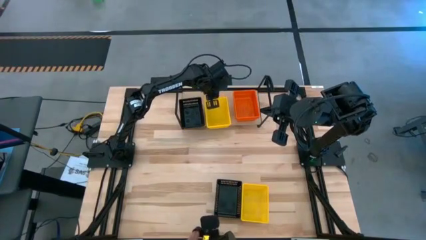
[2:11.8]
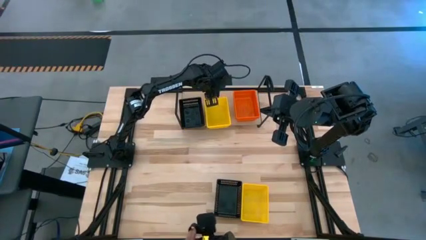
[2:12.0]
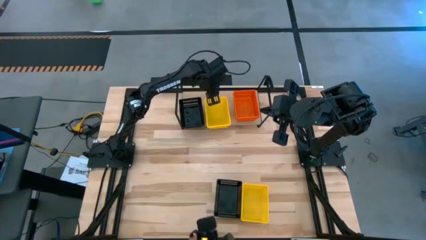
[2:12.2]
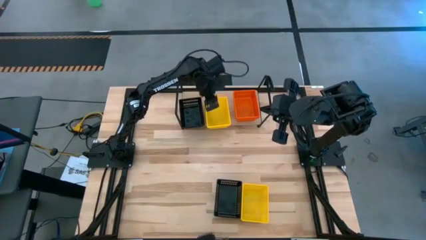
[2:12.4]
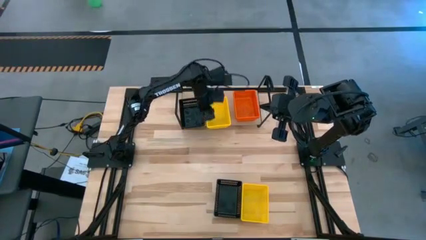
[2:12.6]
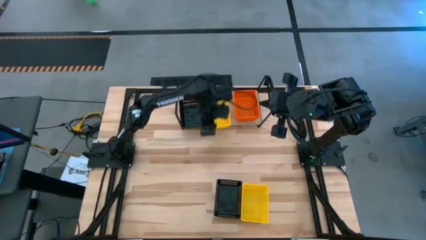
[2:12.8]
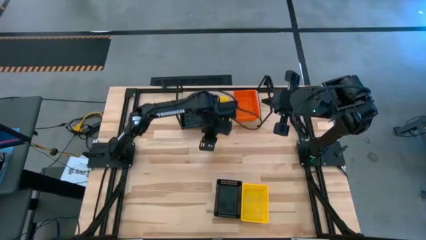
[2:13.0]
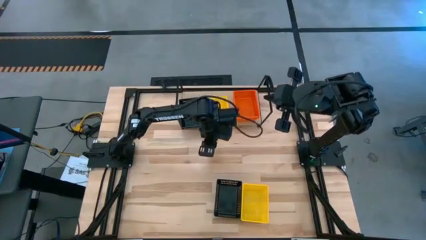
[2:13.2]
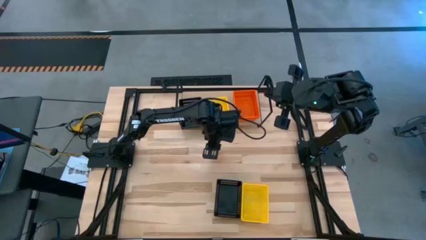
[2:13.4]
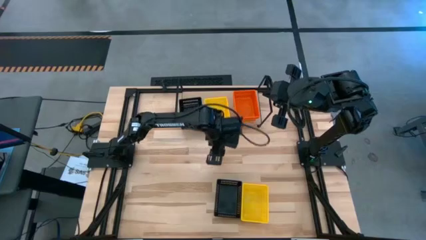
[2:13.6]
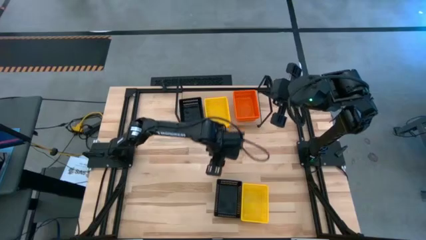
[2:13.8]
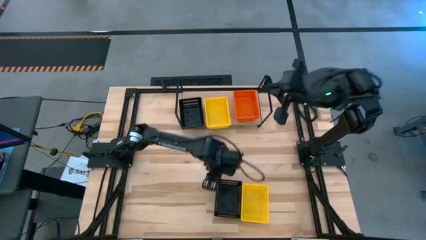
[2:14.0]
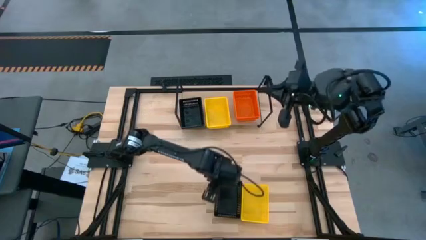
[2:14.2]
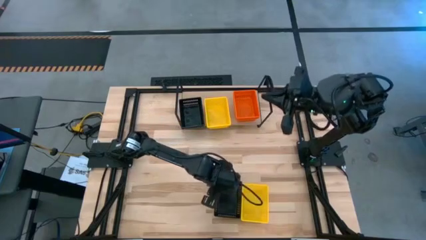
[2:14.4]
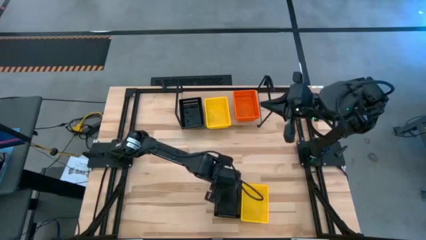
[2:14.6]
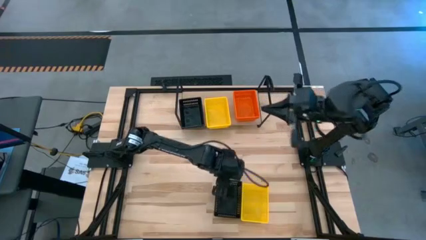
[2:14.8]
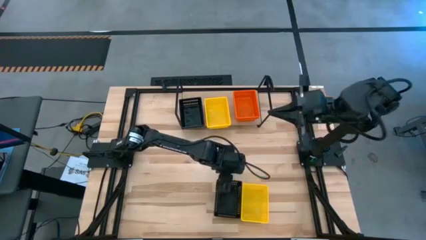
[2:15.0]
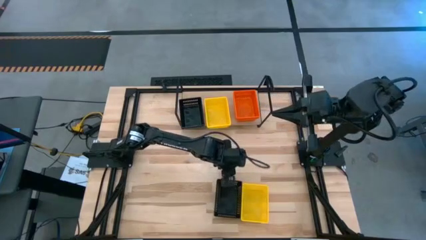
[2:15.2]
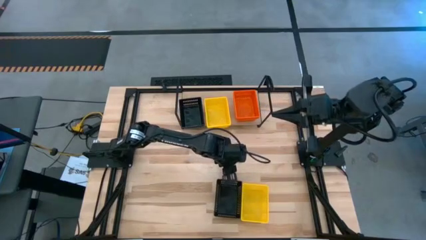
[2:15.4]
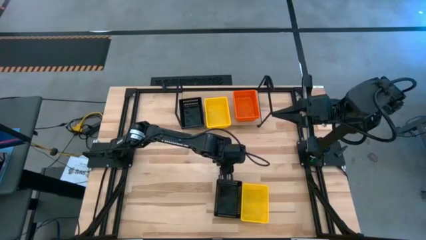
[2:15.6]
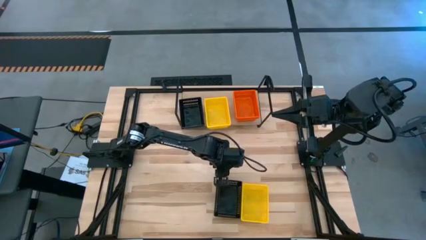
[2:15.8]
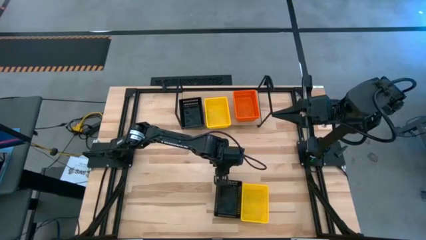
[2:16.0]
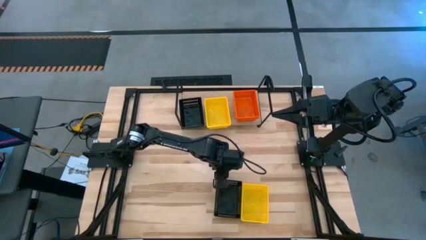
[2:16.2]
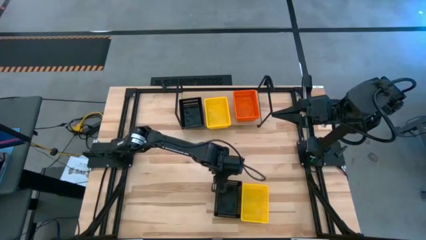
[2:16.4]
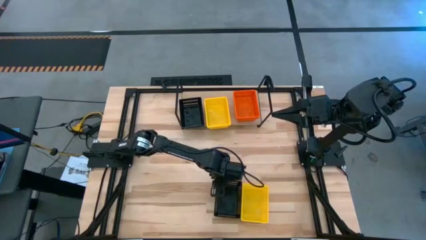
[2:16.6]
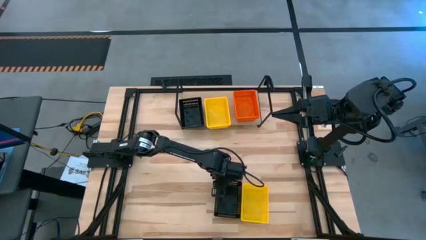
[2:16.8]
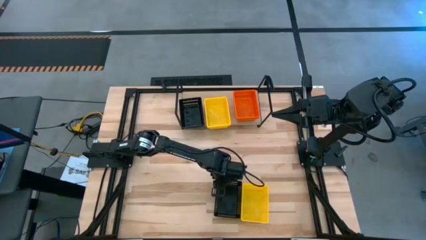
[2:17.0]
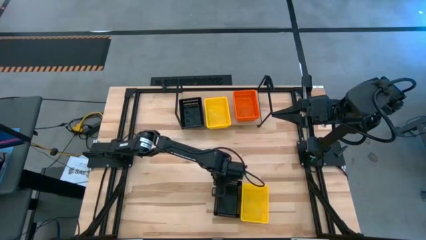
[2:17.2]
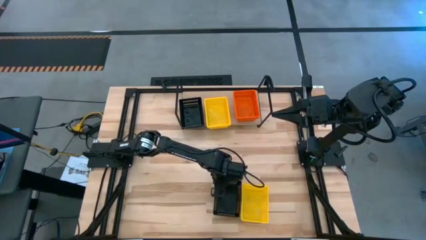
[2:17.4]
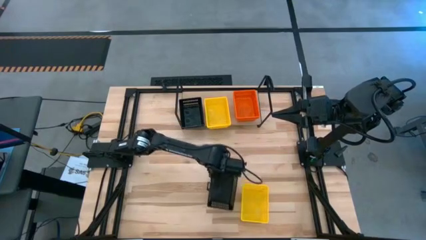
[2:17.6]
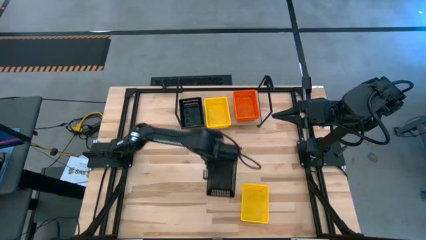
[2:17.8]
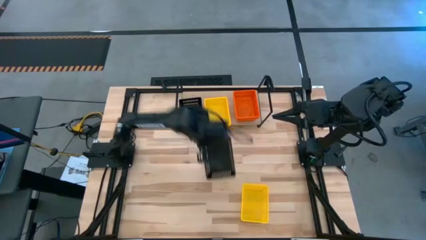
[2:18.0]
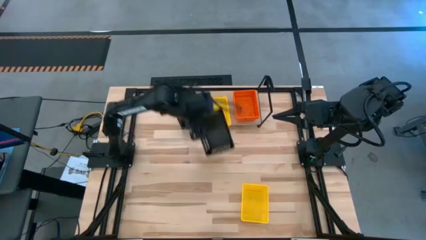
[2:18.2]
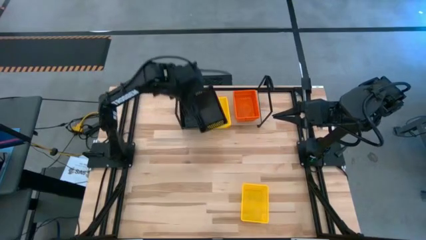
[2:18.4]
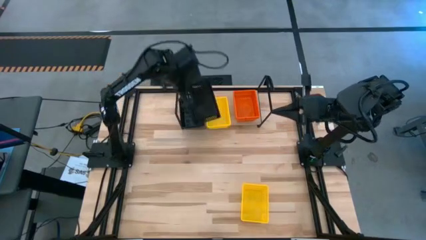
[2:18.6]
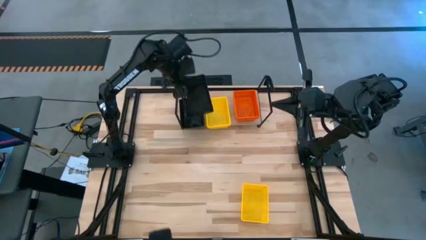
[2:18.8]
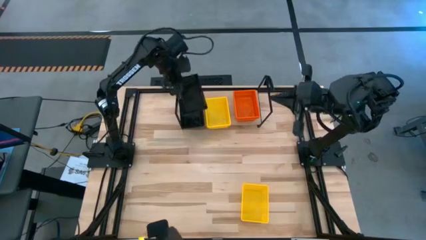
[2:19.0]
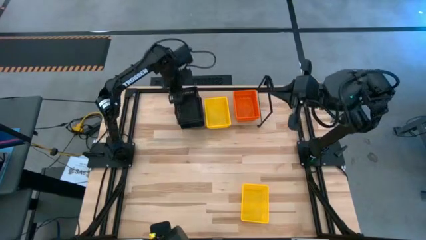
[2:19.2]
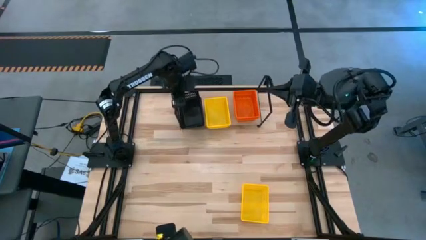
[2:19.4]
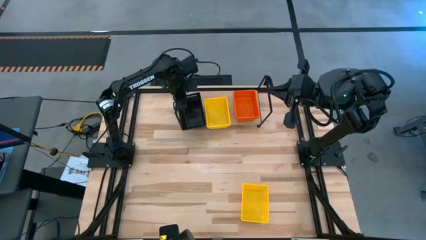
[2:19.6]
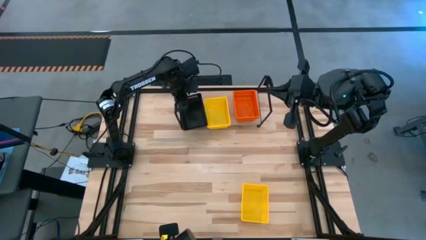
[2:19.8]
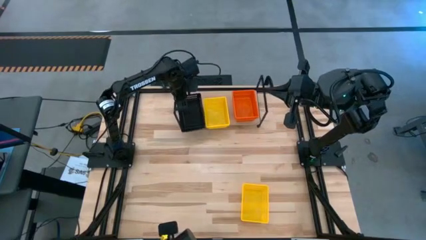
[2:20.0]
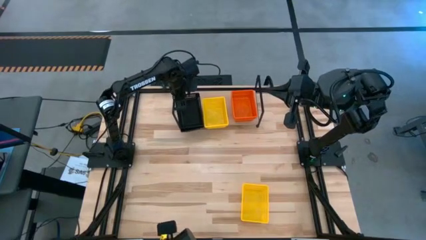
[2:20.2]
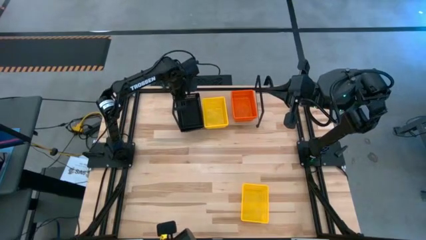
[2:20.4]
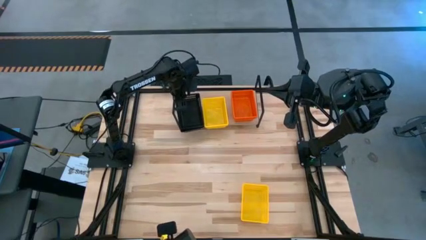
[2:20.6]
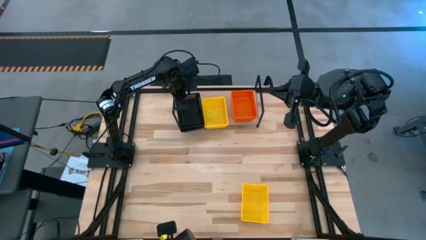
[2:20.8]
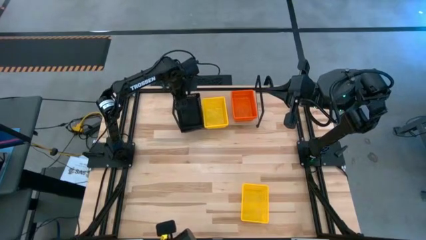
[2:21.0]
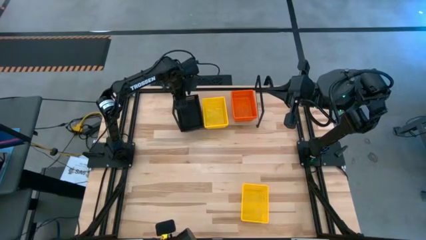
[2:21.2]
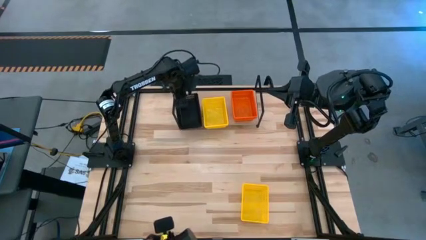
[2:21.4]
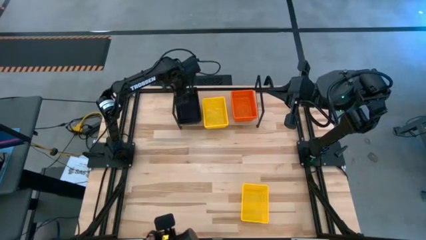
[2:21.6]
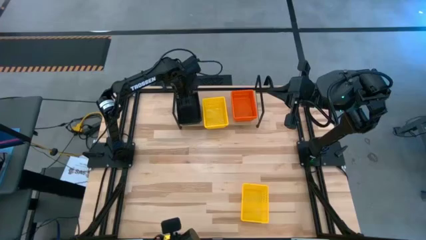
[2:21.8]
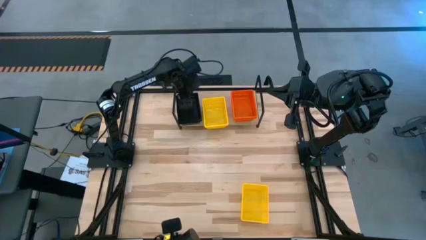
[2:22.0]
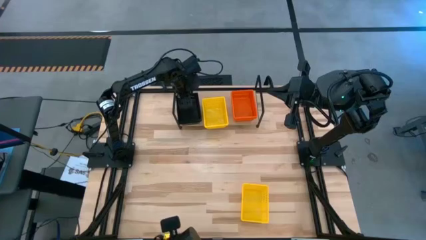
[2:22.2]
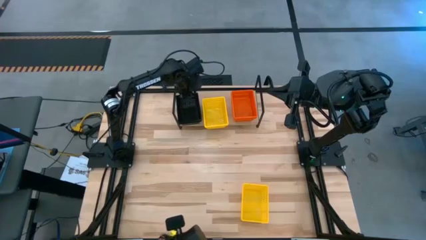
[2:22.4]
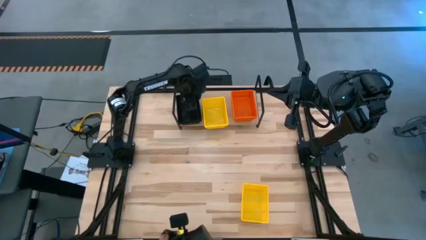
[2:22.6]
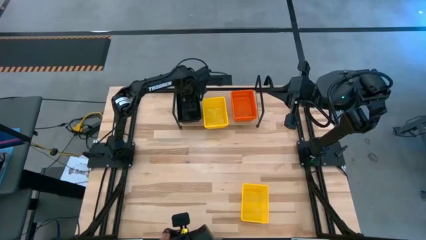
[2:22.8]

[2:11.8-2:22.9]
Task: Stack baskets on shelf by color
Stack the black bin on top of the other black bin on the shelf

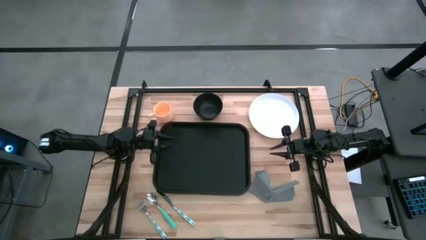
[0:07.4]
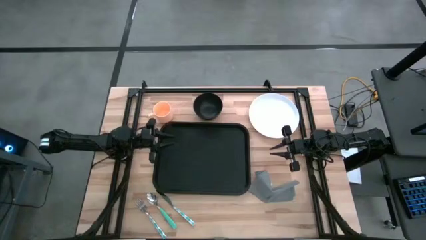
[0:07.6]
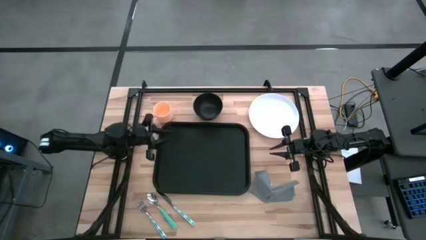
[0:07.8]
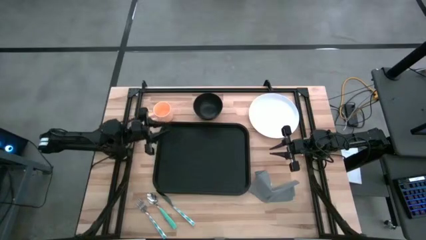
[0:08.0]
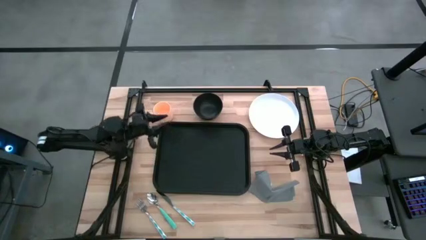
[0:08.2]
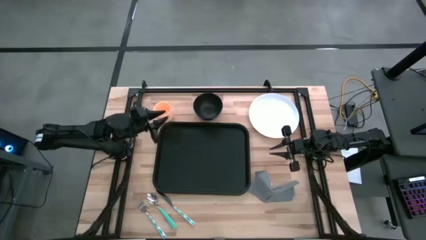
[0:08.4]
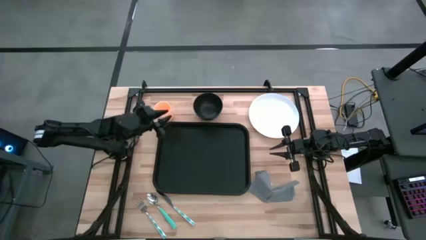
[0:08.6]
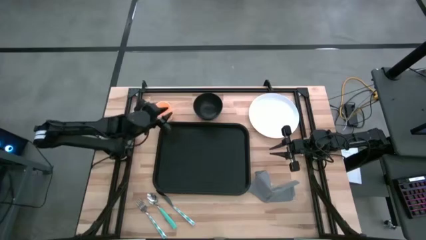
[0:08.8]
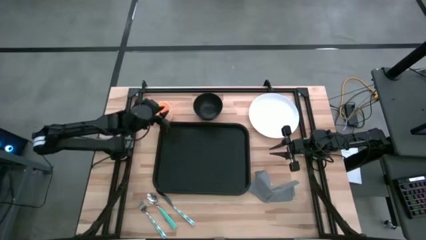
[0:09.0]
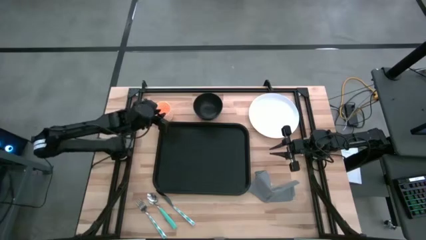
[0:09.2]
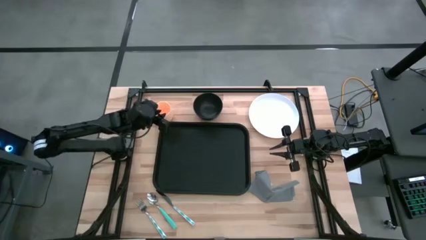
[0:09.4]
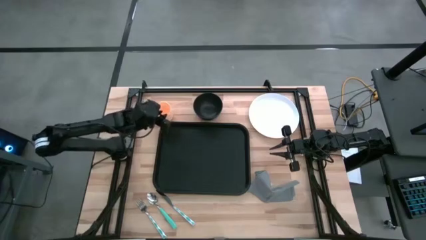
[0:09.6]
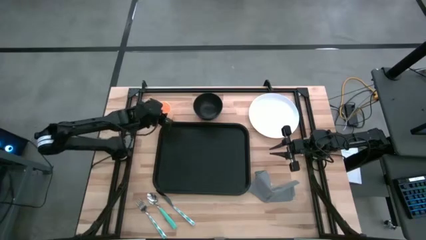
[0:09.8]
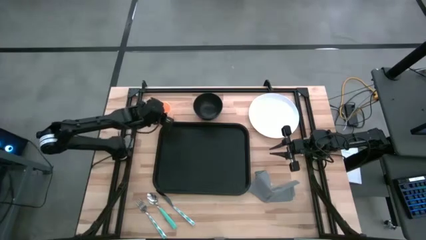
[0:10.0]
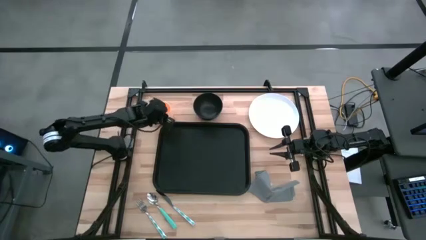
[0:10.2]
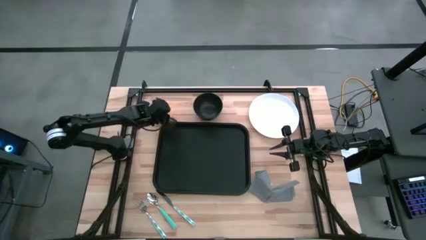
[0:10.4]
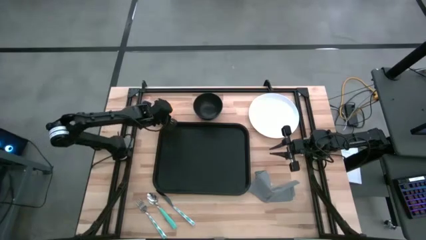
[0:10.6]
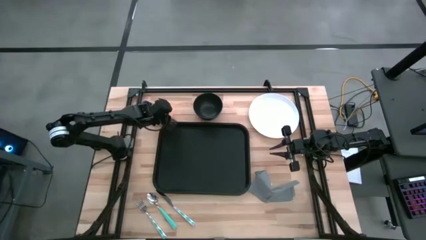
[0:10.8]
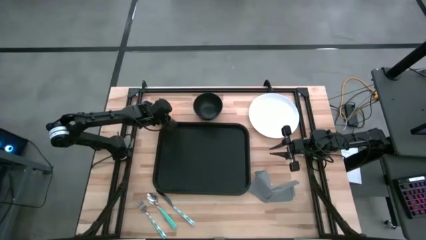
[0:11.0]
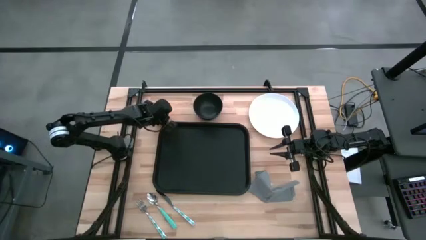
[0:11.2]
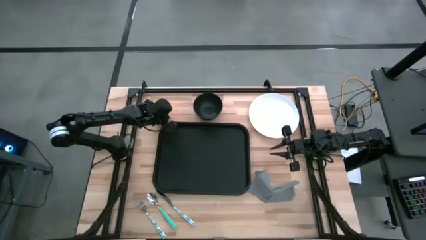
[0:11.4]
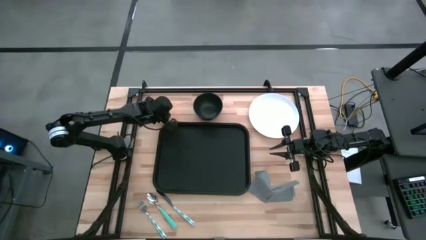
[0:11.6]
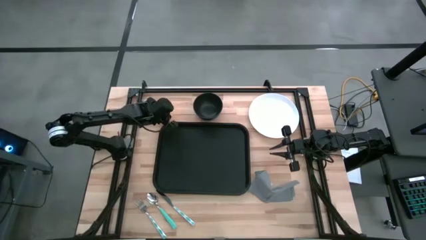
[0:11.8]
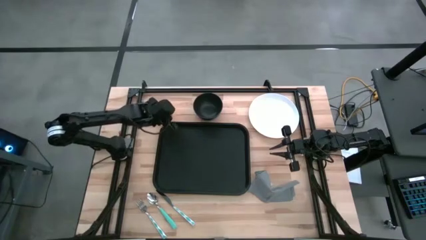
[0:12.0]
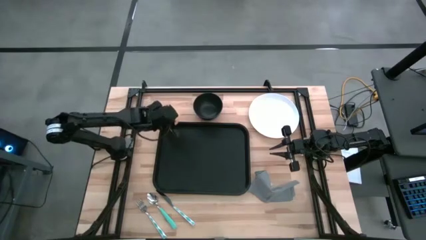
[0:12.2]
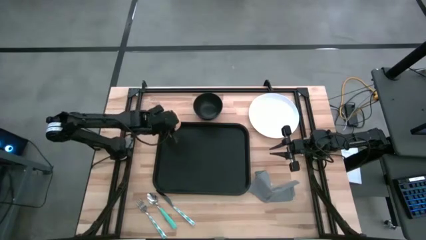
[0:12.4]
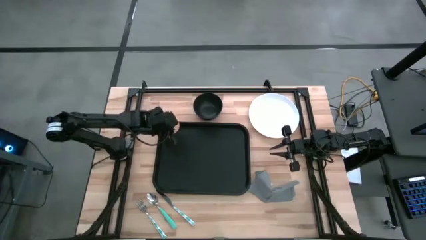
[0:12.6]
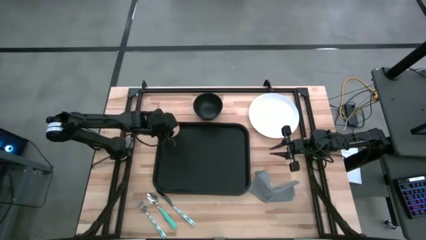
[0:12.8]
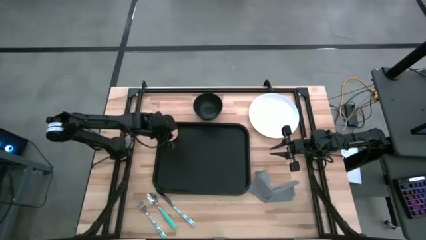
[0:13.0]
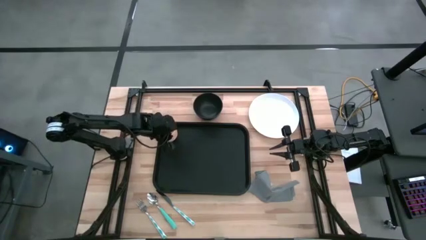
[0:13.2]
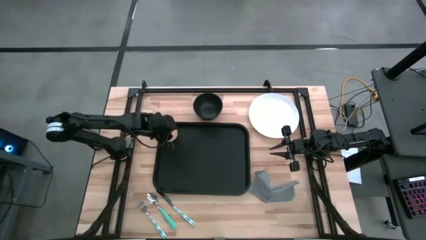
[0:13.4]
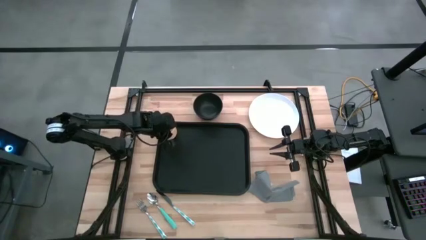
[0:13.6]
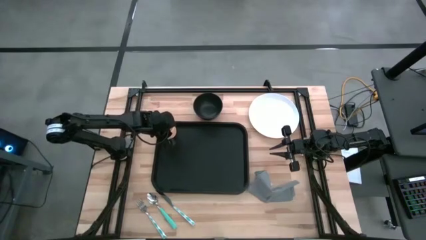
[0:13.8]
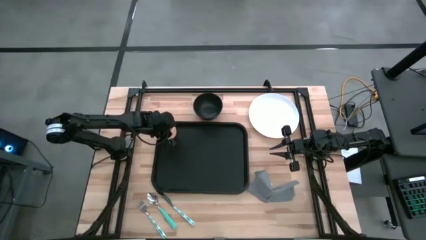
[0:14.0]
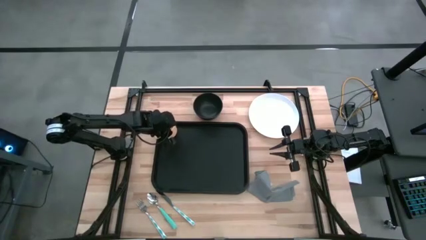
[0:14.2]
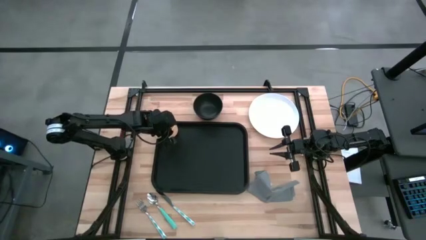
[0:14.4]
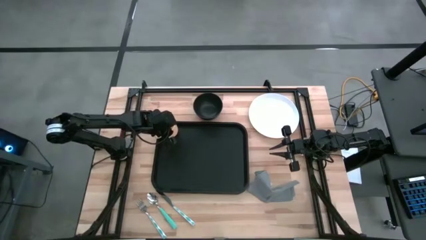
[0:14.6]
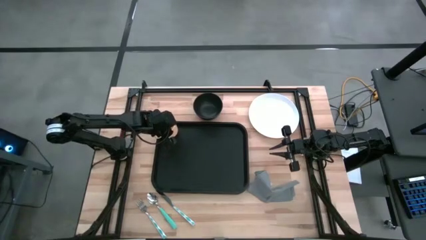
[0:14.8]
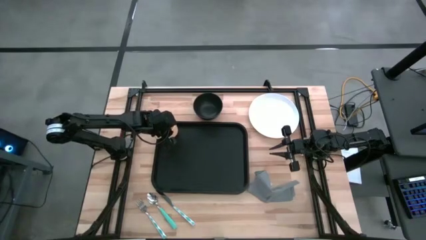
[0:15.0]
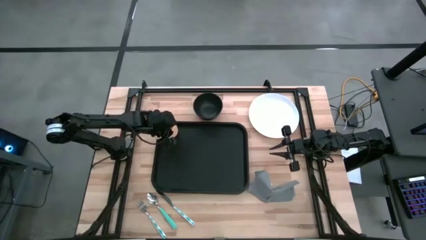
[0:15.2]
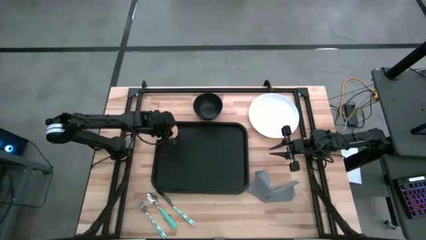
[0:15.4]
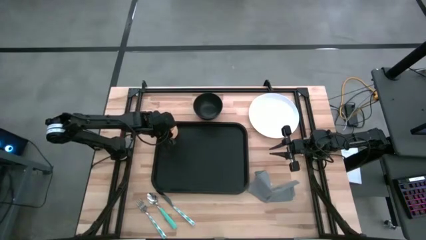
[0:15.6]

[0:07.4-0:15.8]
Task: Set up tray
Put the orange mug on the black serving tray
